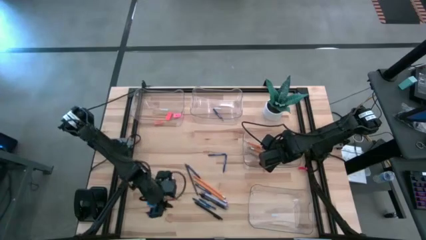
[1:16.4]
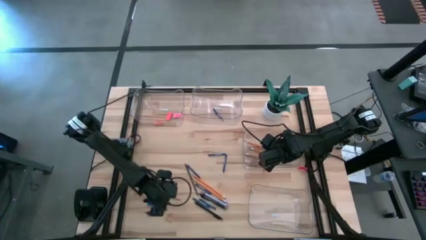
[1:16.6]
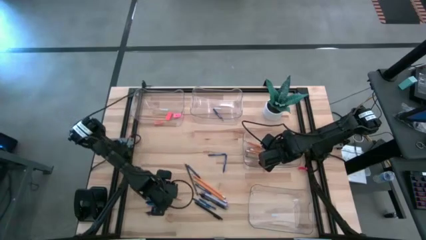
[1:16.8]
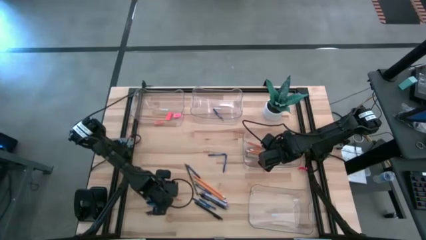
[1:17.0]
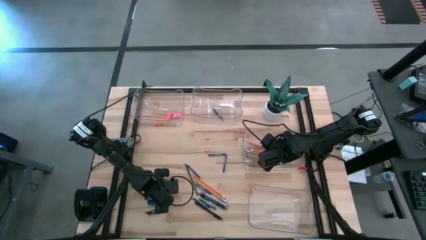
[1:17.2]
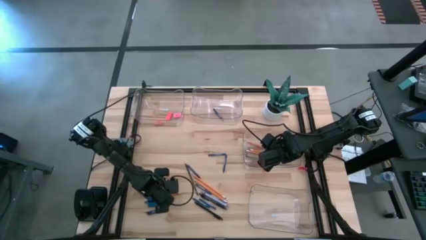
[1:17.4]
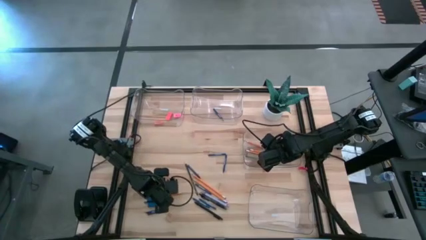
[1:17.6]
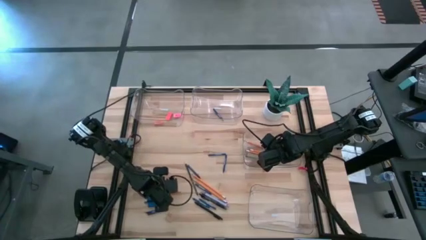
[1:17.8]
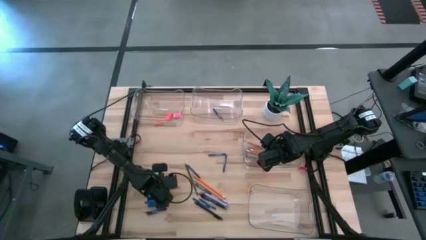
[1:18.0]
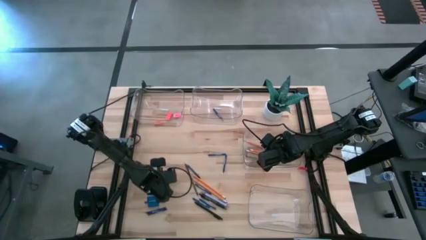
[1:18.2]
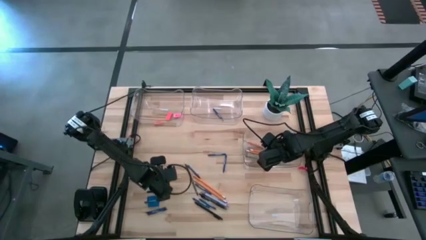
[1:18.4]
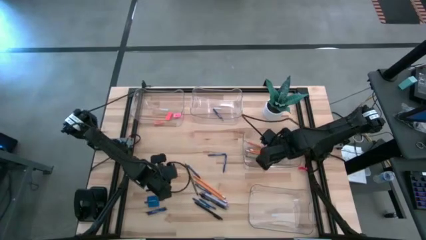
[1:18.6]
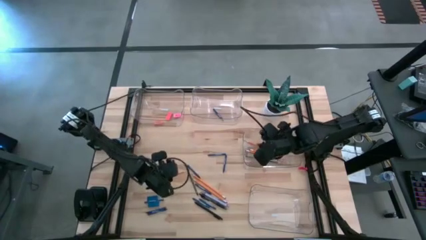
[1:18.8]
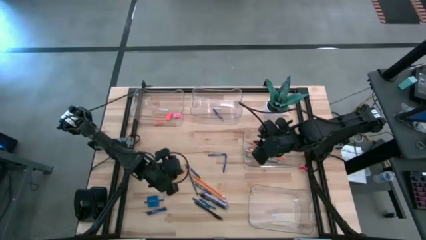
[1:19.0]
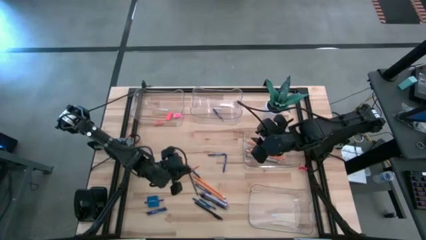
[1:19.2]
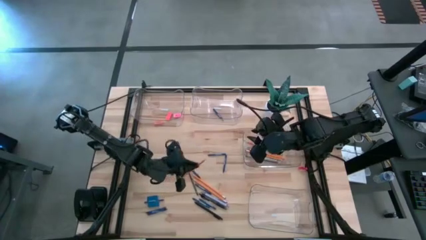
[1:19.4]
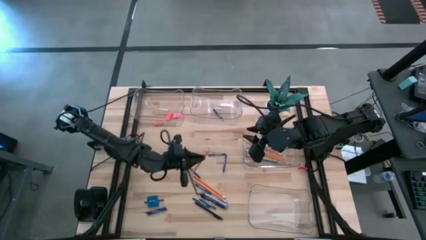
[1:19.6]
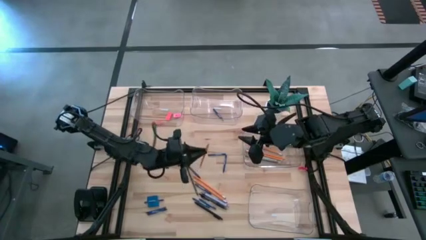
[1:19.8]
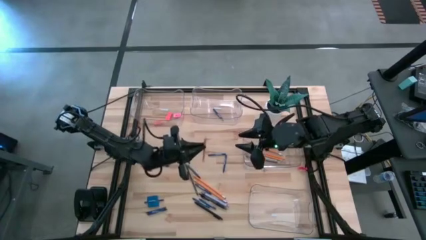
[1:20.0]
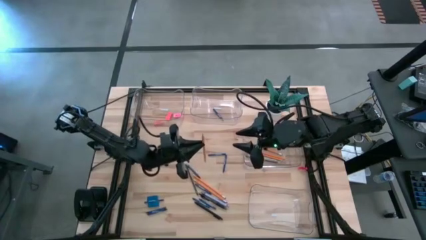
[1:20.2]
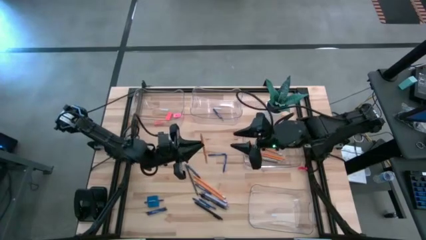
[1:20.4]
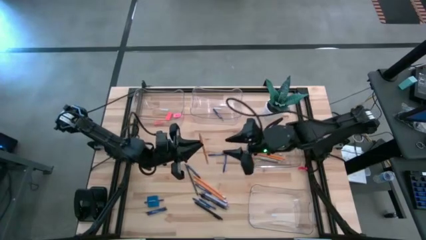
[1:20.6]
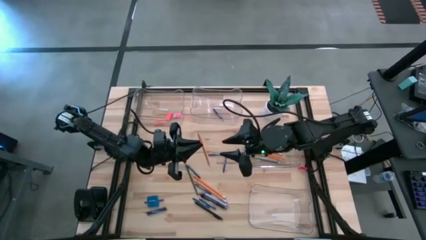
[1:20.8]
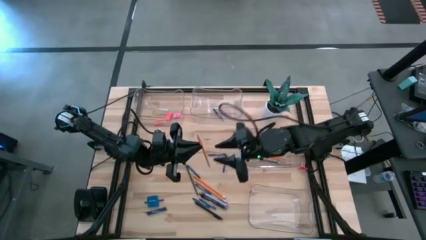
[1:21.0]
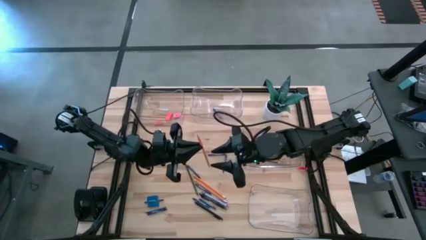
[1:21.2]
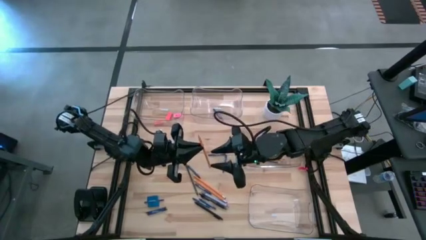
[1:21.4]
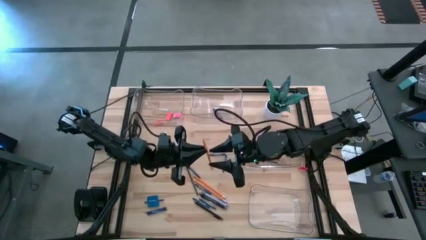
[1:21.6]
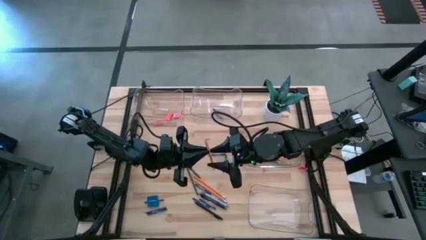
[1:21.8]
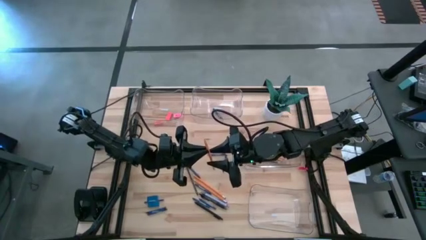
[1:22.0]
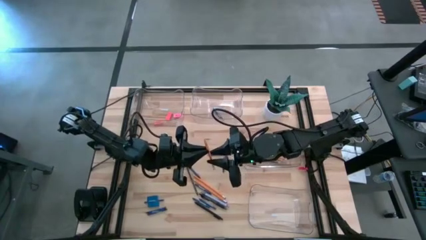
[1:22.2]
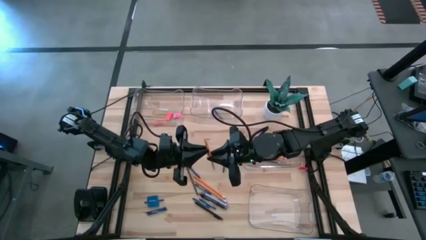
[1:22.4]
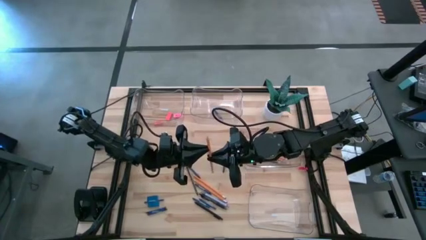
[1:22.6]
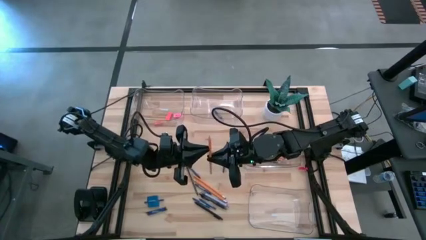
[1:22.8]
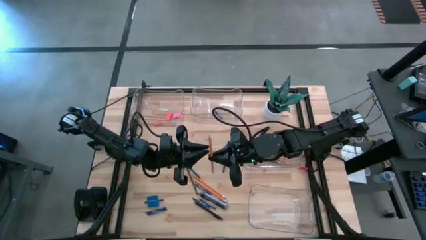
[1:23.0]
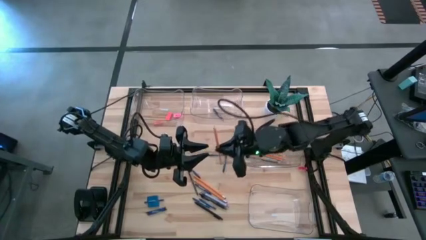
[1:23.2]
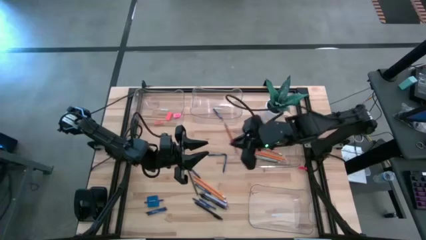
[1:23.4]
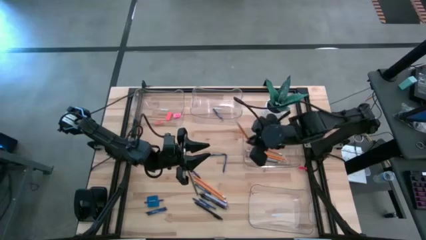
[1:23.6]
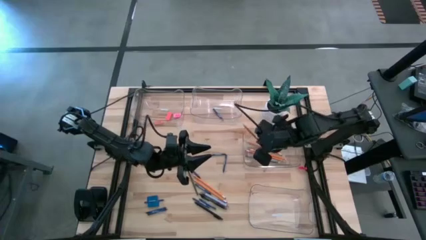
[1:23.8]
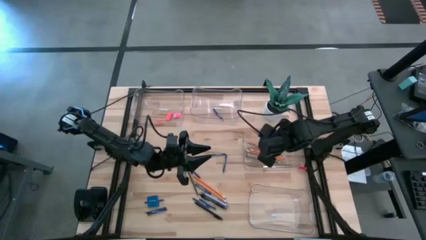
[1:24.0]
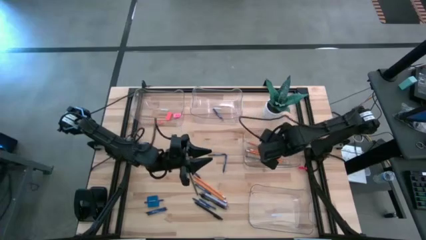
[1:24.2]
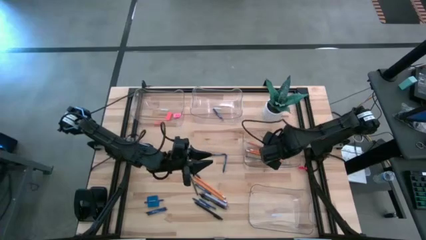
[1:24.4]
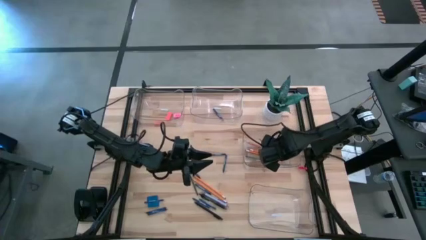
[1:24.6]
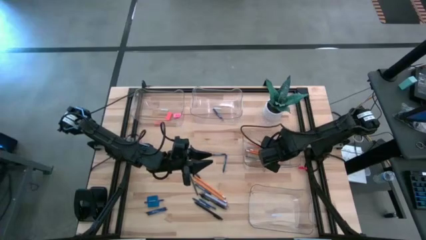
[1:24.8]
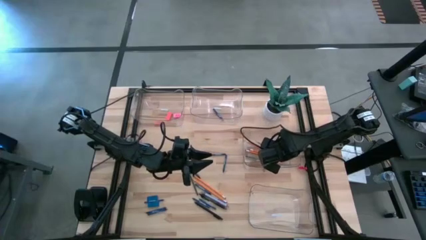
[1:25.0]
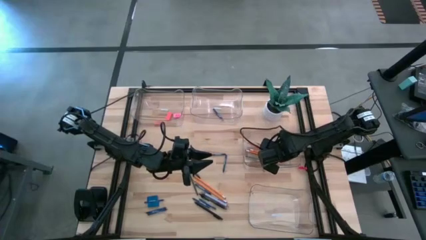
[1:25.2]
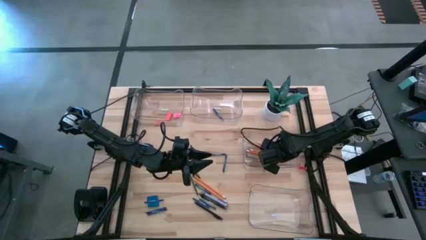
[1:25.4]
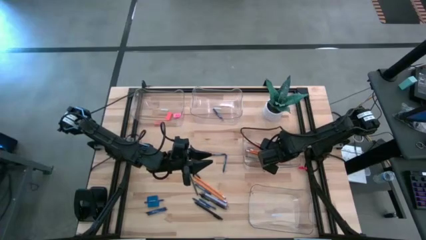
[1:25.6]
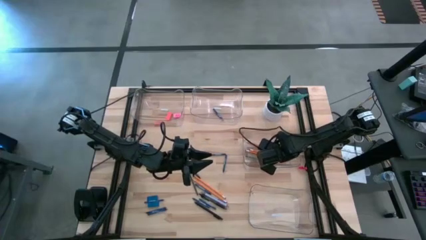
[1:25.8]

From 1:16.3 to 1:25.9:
Task: Sort crayons/erasers/pens/pencils in bins
Put the orange pencil into the middle transparent bin

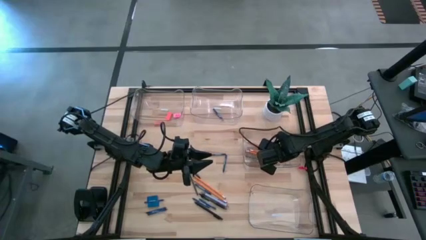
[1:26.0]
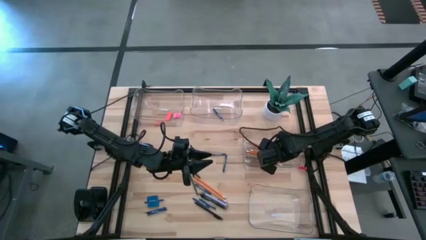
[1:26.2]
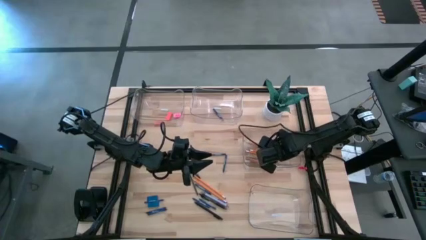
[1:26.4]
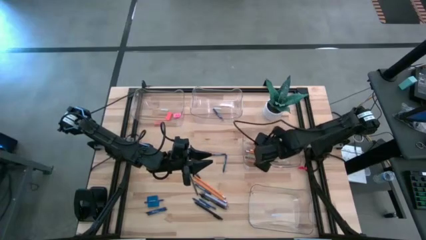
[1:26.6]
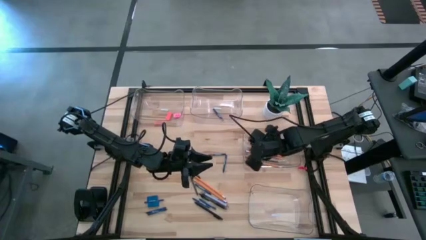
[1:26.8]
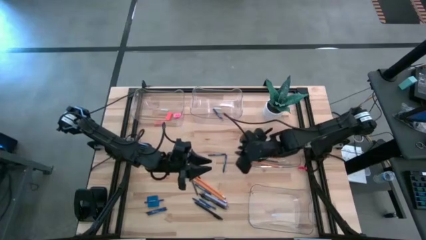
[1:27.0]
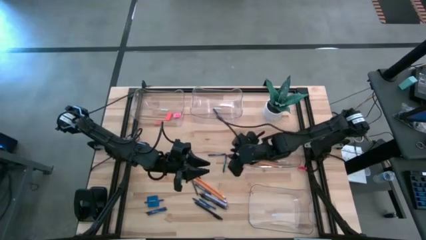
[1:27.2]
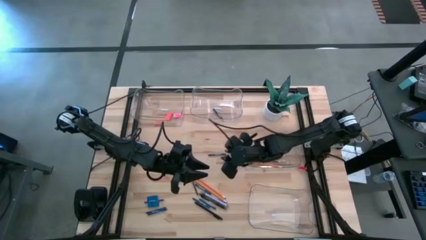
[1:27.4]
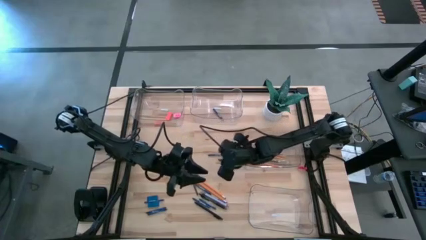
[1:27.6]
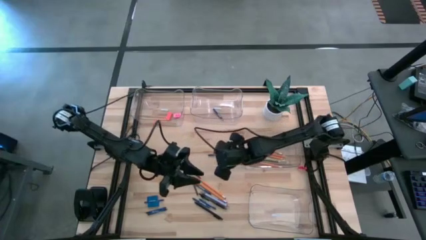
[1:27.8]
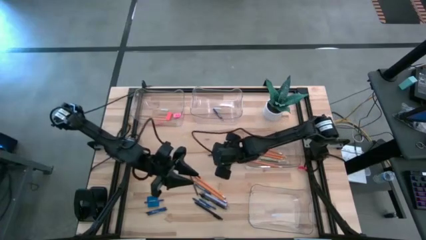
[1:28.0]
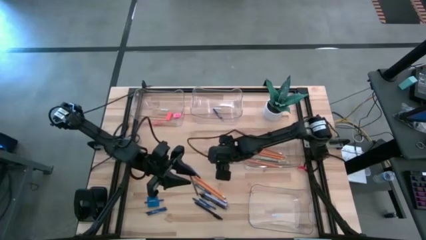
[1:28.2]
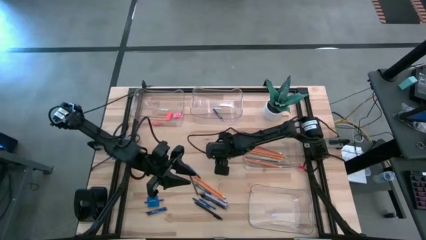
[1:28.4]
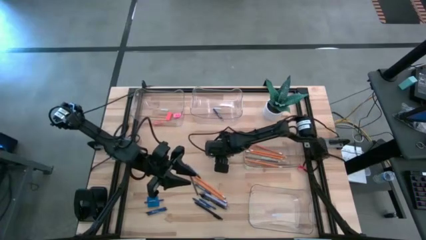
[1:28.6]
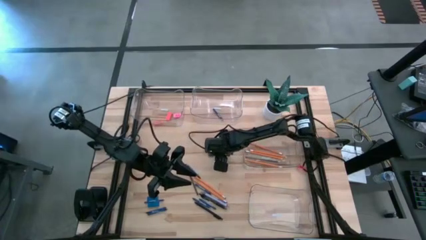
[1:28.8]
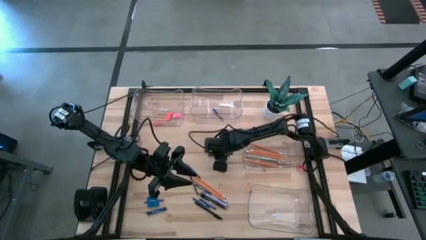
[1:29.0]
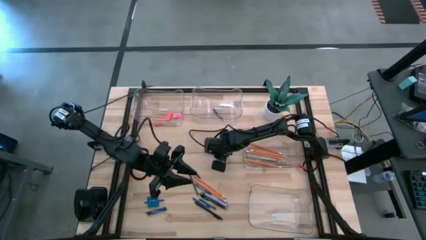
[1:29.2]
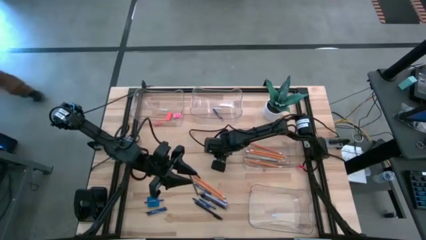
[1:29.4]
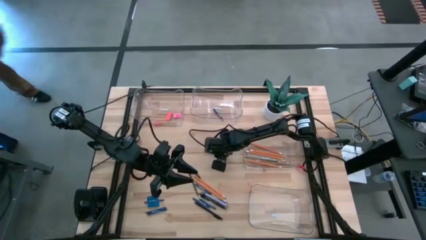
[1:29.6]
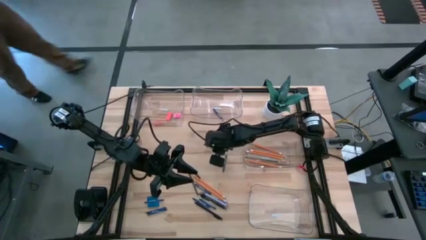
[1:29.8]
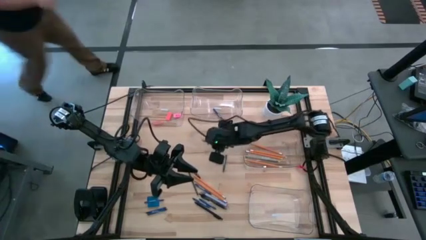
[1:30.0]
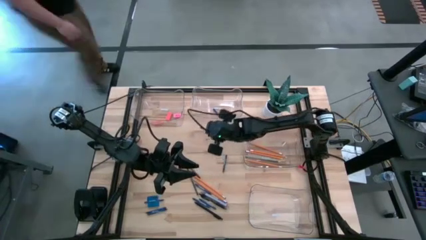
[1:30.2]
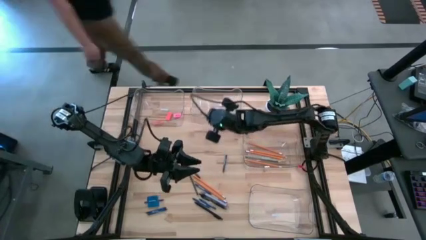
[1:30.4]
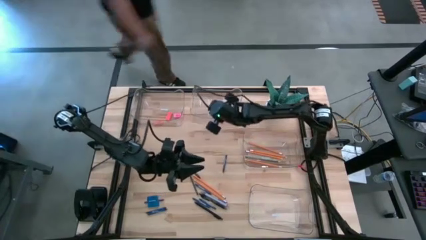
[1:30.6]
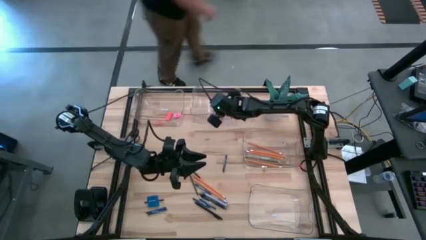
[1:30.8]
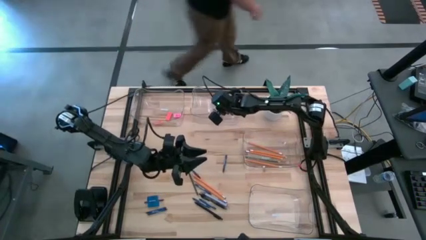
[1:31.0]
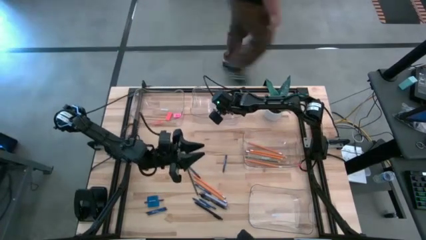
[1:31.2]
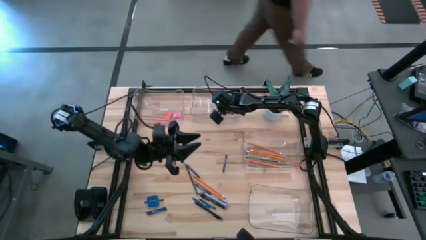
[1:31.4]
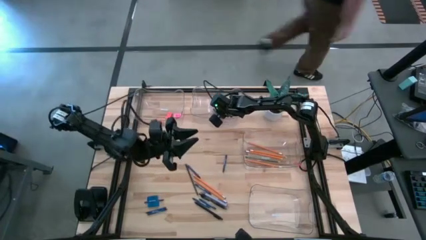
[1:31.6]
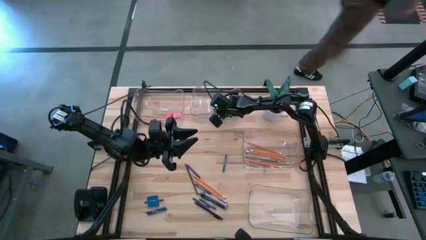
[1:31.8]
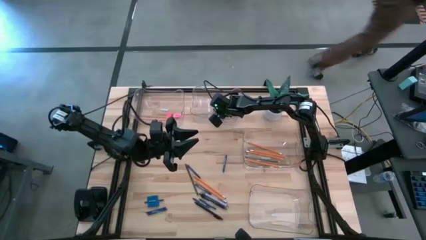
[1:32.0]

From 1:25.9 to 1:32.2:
Put the blue crayon into the top right transparent bin
